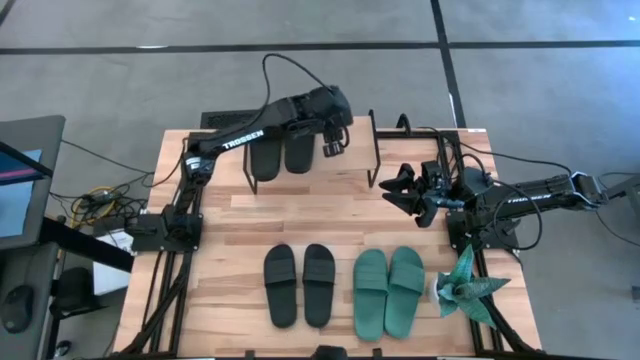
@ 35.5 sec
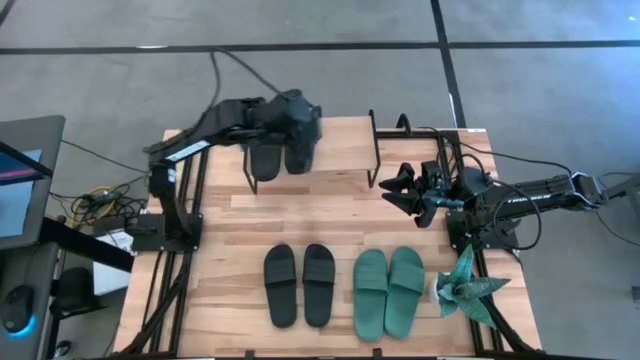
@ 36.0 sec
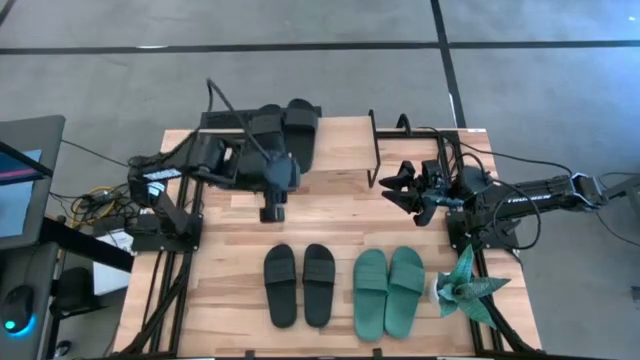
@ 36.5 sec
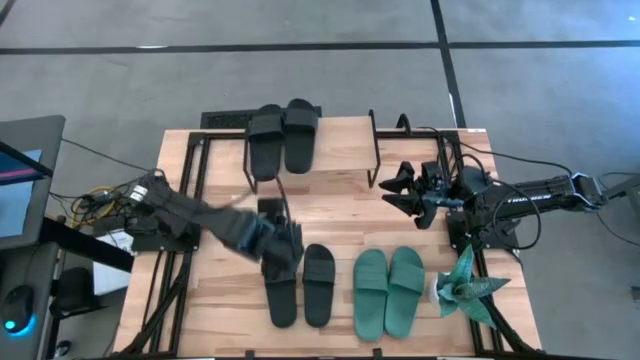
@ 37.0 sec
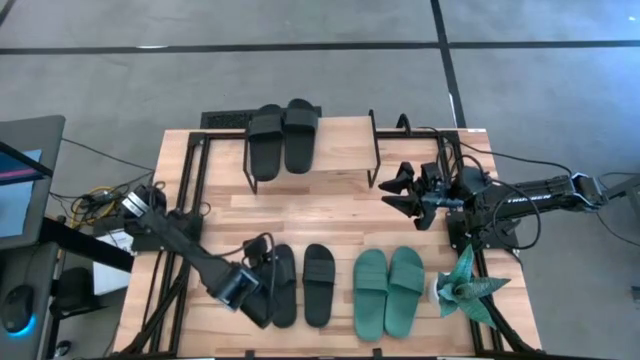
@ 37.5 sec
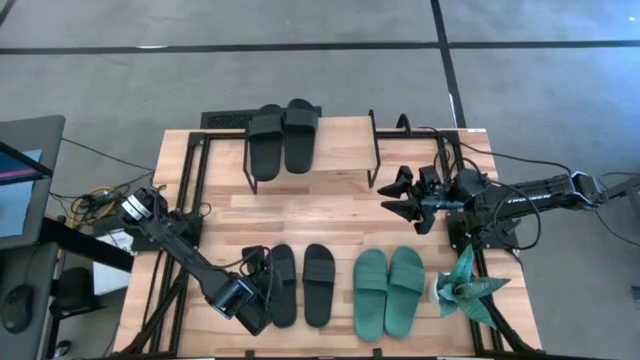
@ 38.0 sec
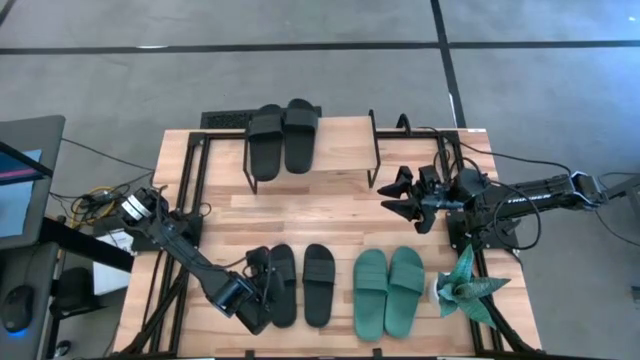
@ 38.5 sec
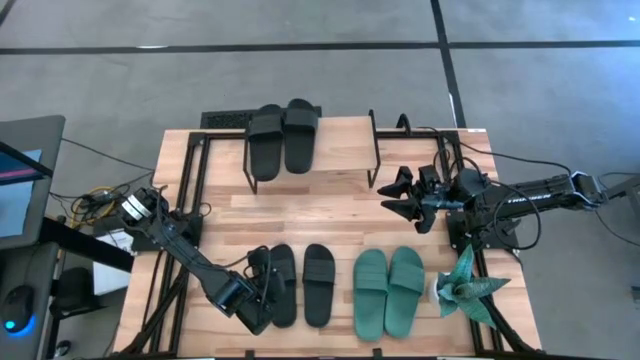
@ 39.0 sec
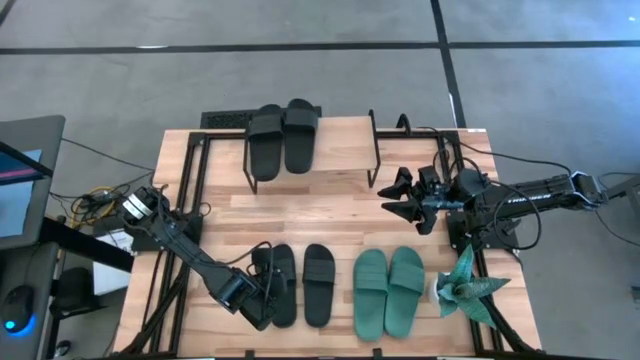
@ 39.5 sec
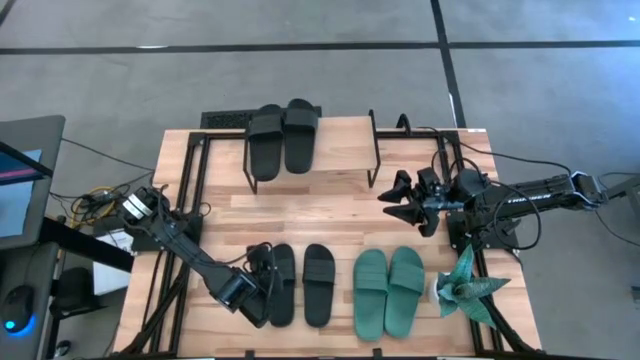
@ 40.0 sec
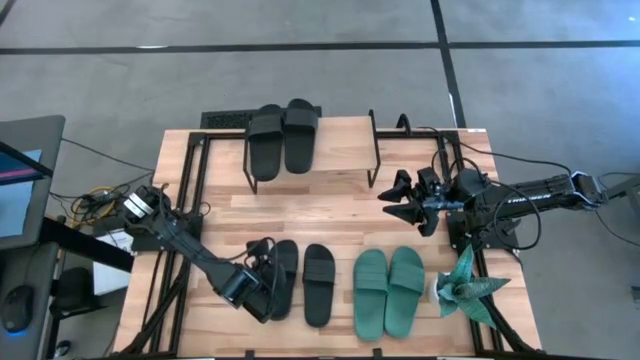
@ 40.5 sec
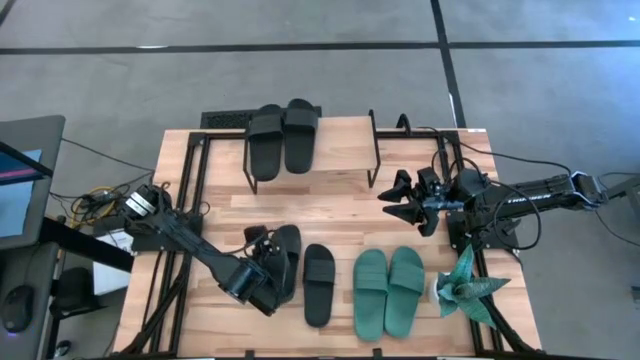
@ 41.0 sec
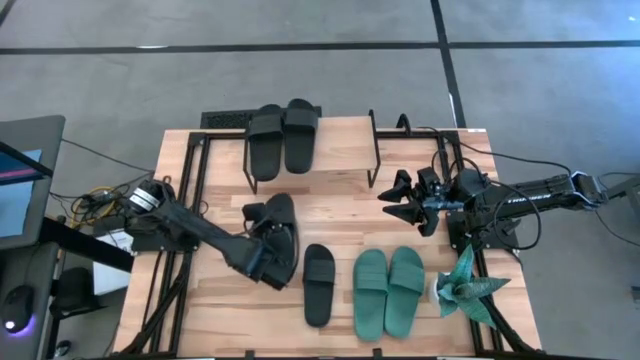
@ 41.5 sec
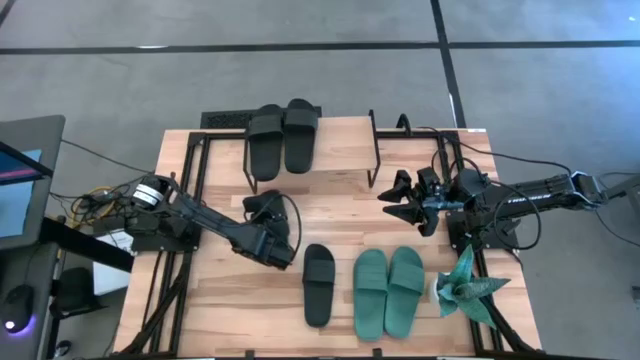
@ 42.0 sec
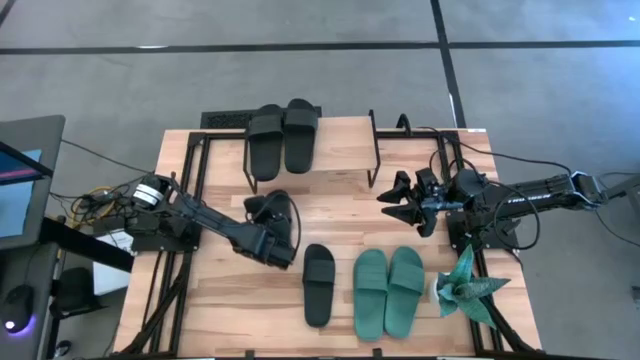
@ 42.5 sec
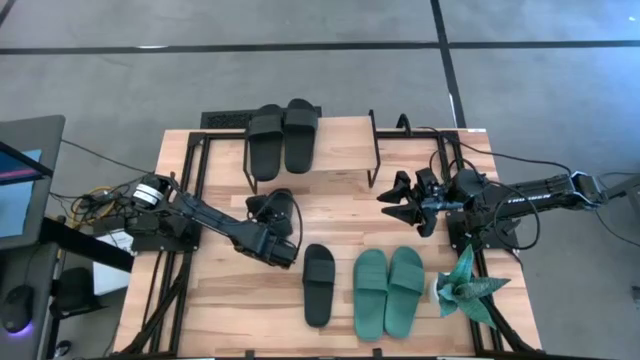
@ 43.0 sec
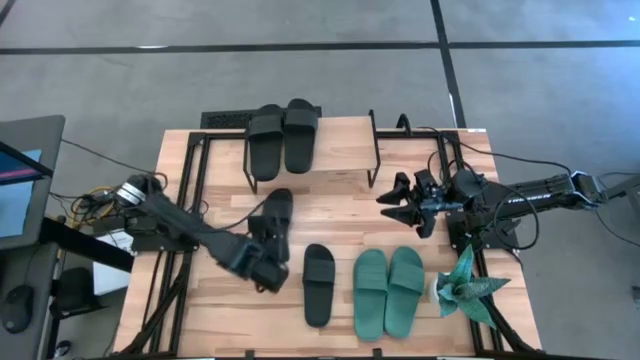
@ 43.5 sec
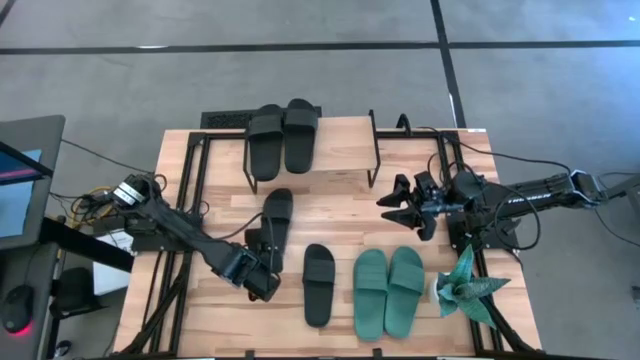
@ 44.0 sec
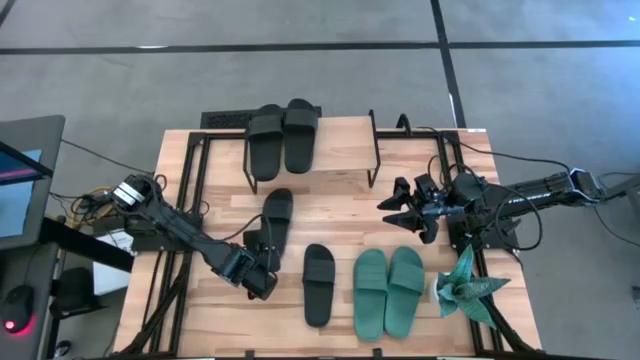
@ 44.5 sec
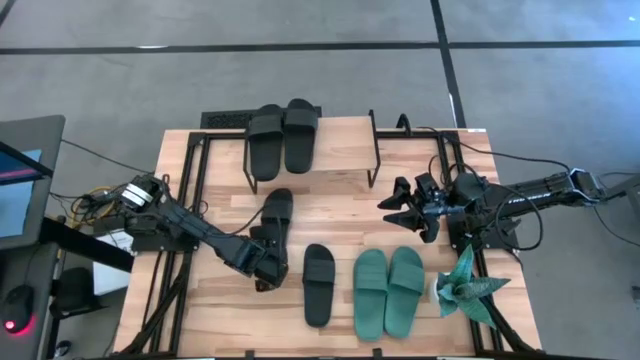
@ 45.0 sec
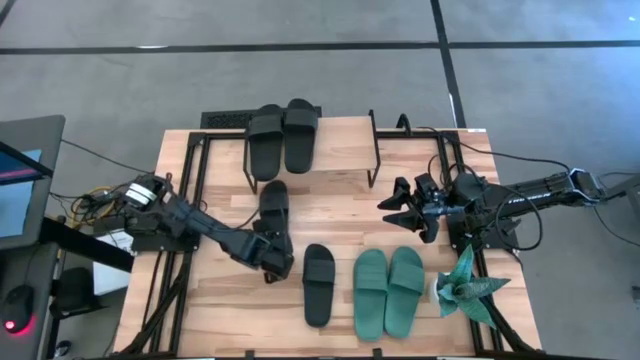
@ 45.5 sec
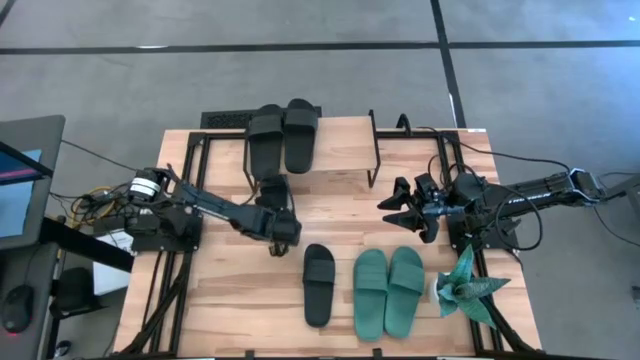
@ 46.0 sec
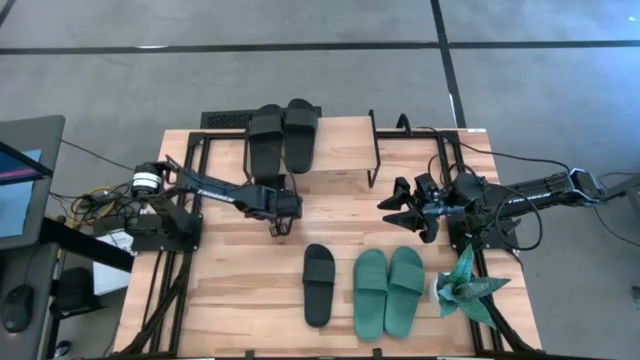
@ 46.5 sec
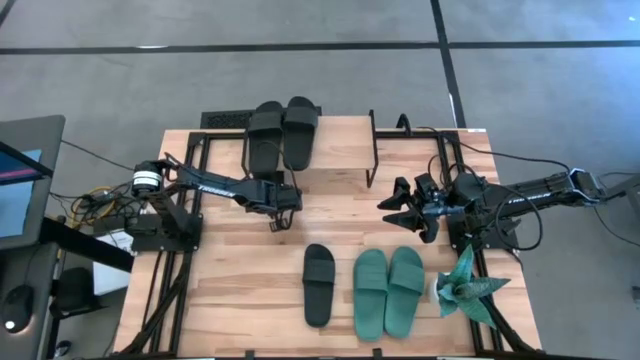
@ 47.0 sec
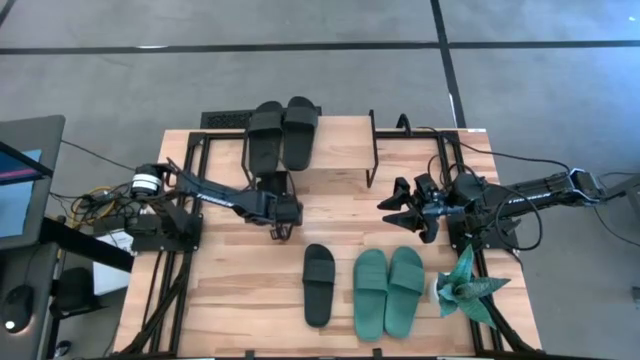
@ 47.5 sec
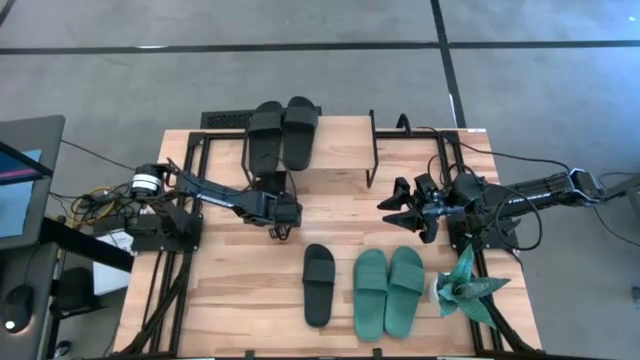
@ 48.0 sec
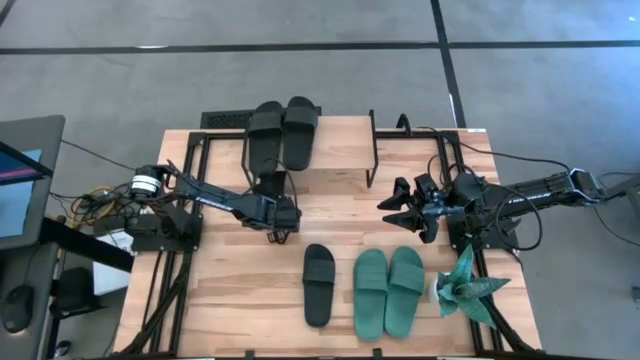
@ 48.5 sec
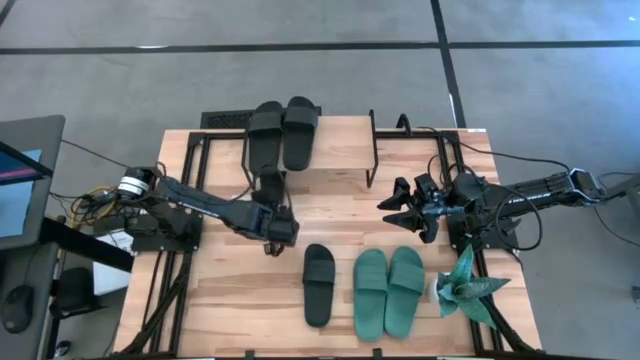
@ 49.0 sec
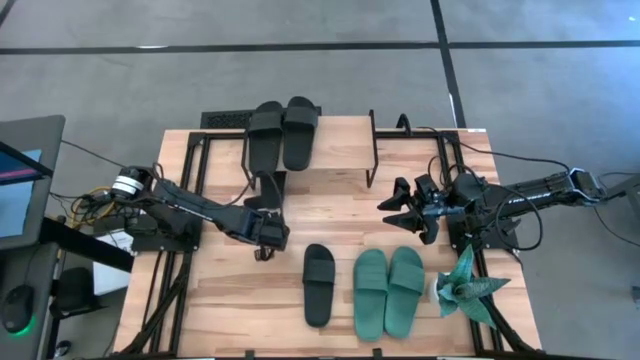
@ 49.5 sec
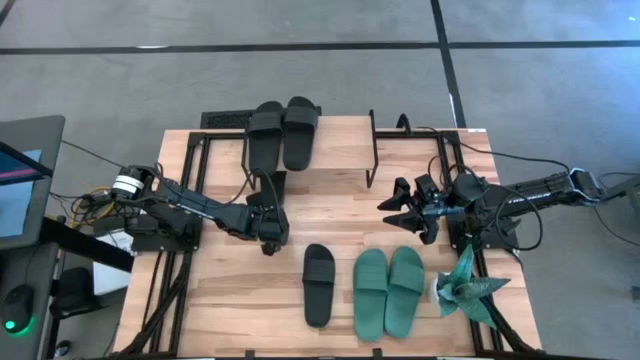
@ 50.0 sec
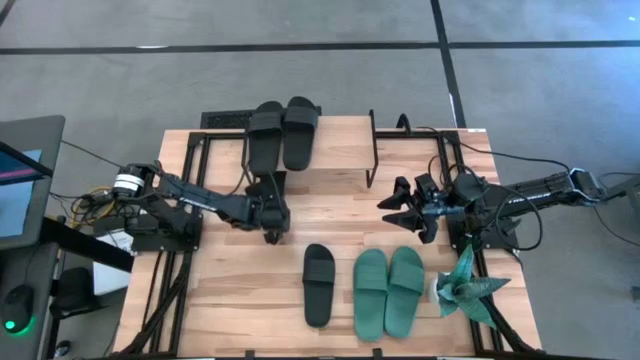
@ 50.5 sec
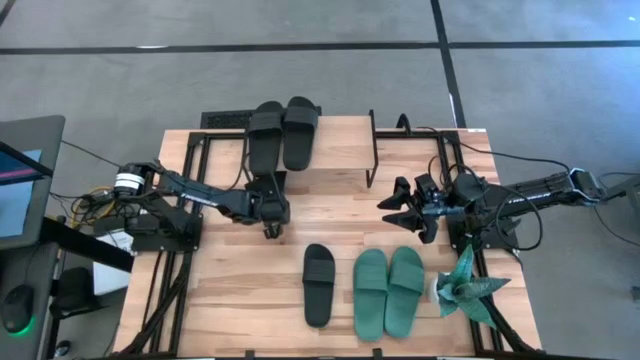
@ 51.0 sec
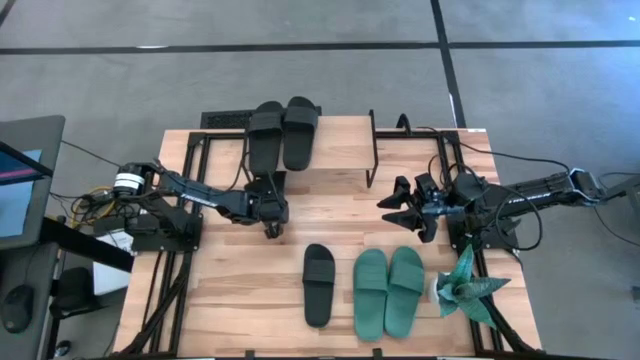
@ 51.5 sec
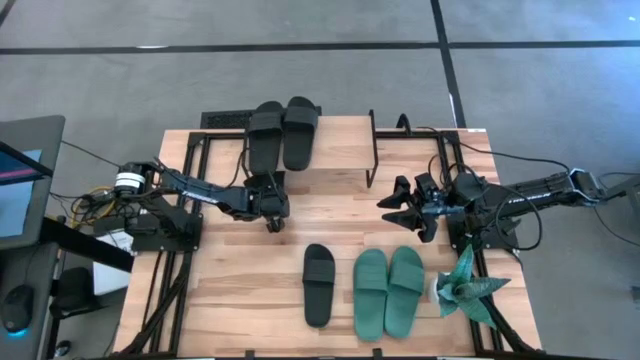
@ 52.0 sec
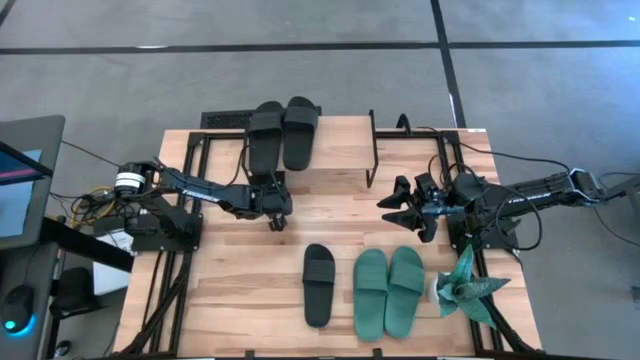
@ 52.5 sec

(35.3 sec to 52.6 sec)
Task: Pick and place slides into the shelf
Put the black slipper under the shelf

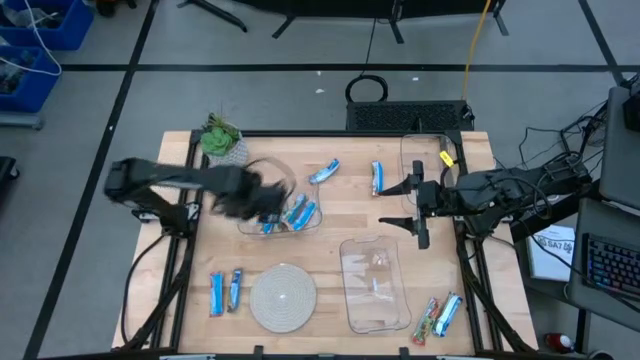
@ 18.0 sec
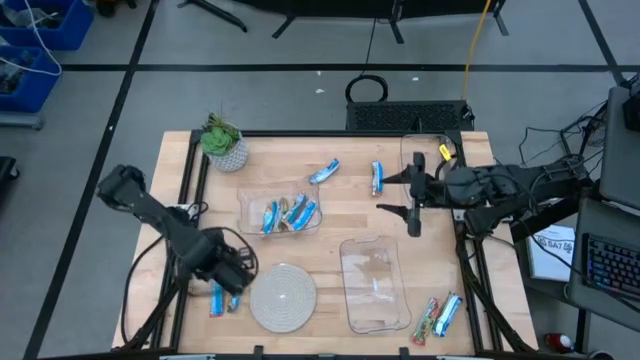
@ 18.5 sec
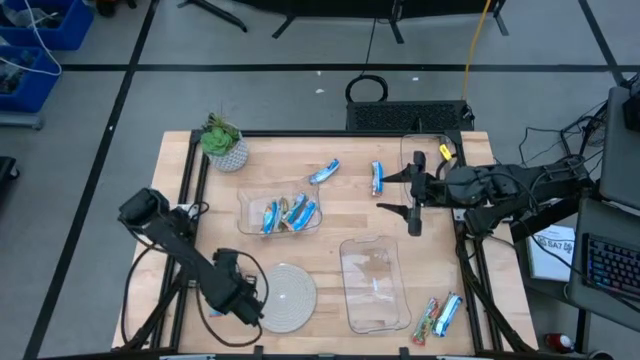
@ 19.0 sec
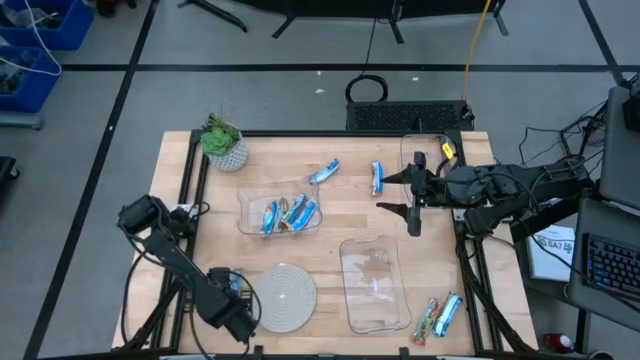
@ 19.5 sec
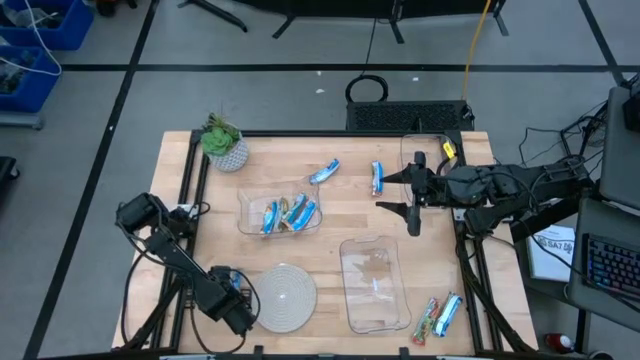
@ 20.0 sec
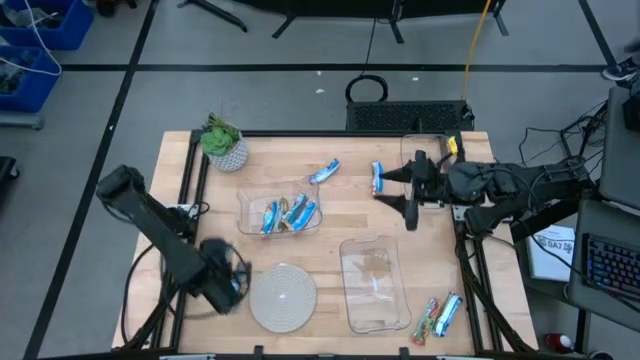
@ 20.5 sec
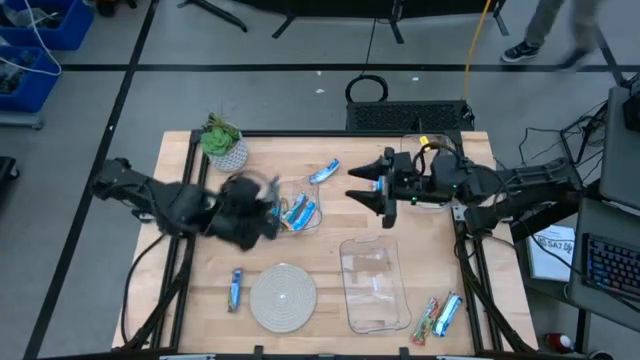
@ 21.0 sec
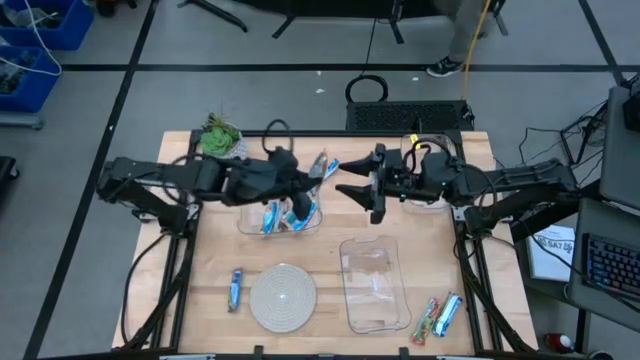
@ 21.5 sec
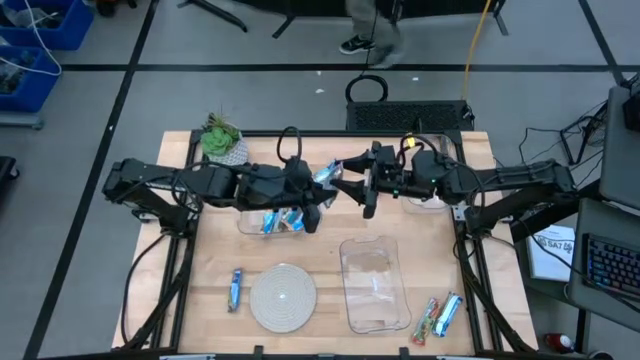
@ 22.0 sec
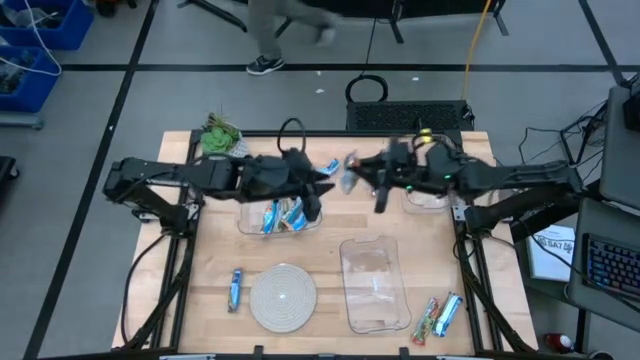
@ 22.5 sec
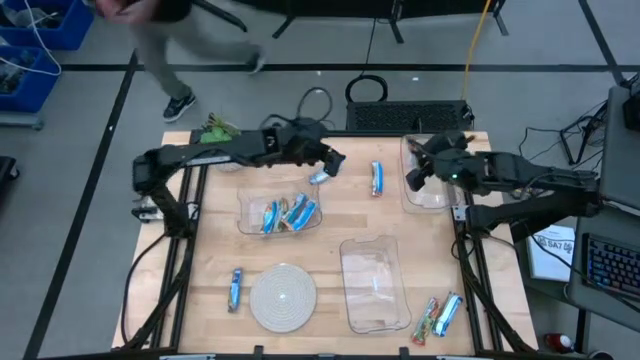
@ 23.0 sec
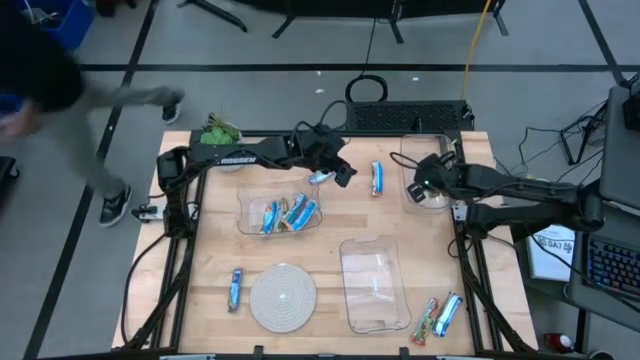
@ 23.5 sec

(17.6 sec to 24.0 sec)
Task: Pick and place Granola Bars by type
Put the bottom left red granola bar into the top right transparent bin
